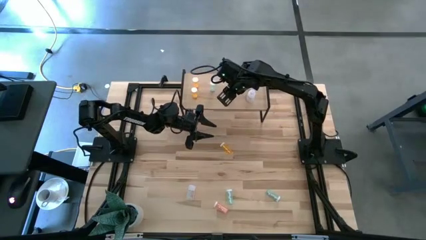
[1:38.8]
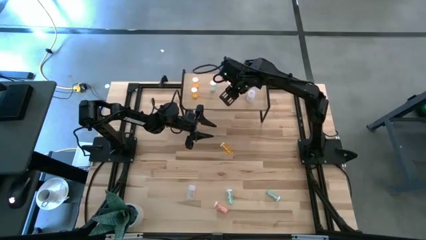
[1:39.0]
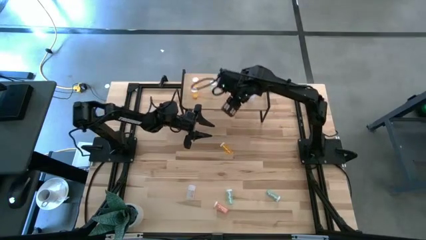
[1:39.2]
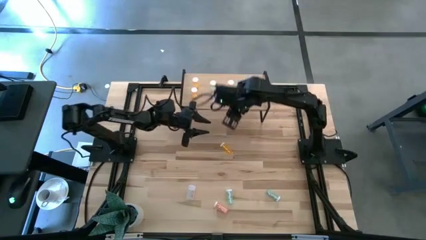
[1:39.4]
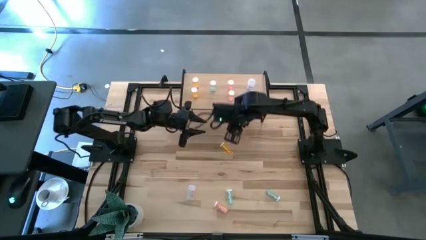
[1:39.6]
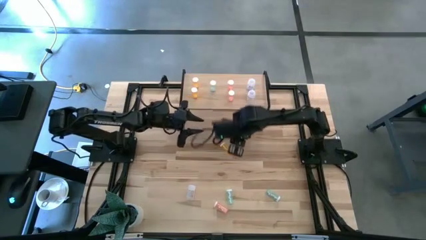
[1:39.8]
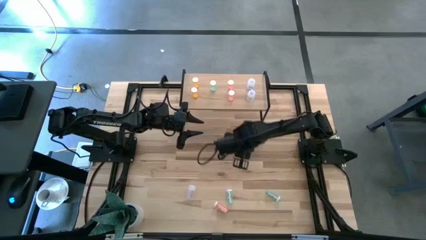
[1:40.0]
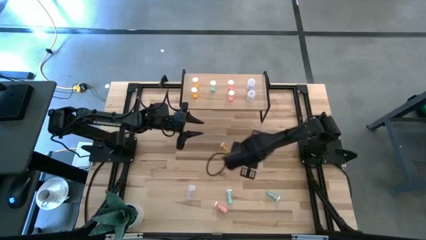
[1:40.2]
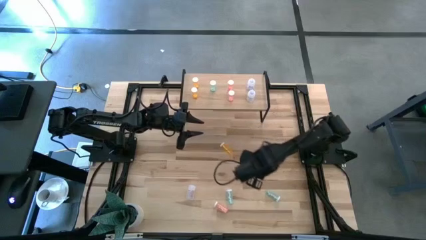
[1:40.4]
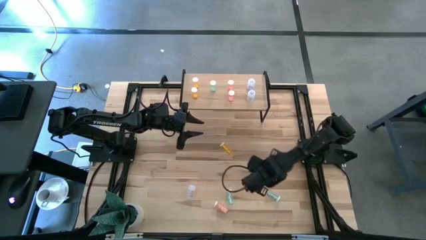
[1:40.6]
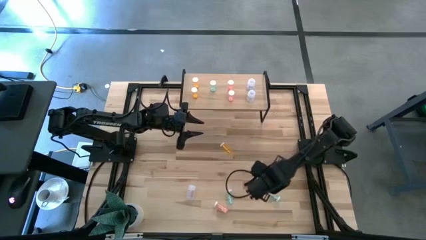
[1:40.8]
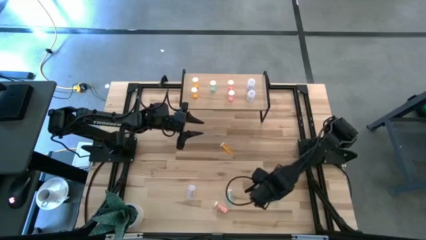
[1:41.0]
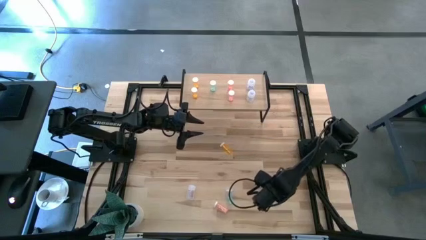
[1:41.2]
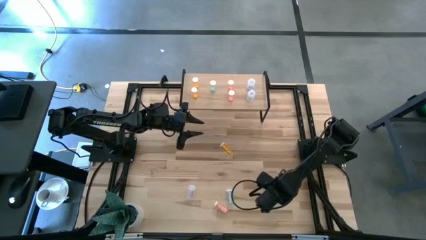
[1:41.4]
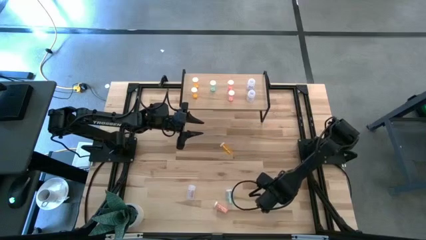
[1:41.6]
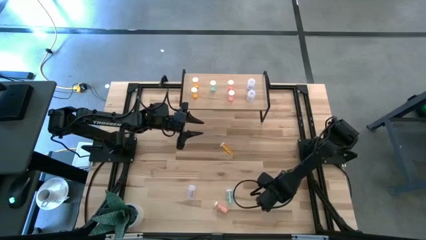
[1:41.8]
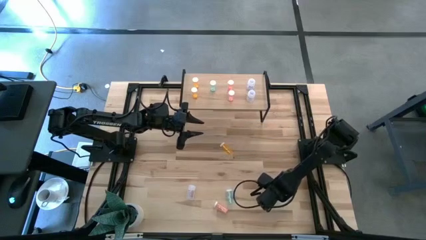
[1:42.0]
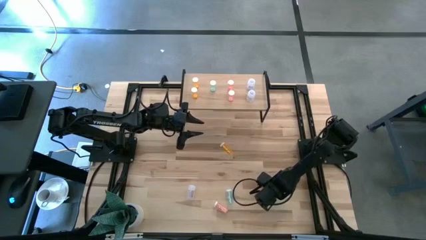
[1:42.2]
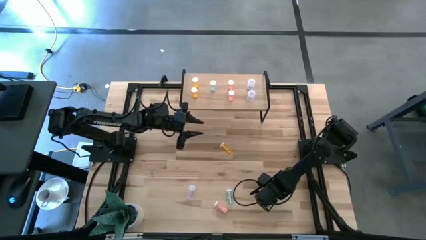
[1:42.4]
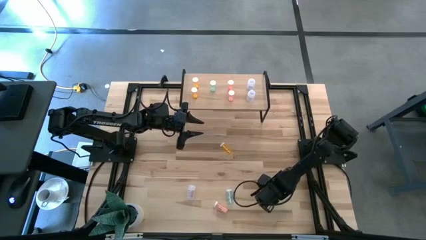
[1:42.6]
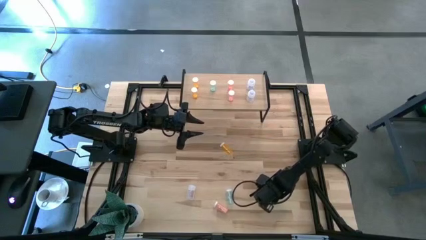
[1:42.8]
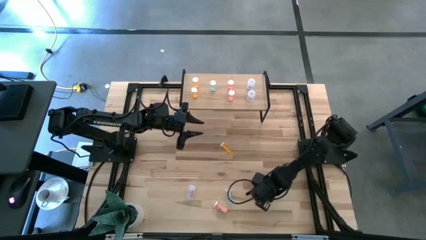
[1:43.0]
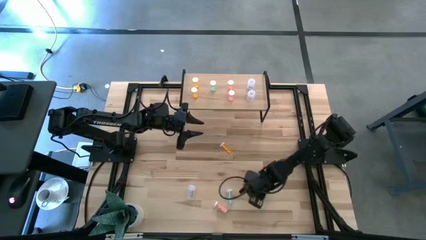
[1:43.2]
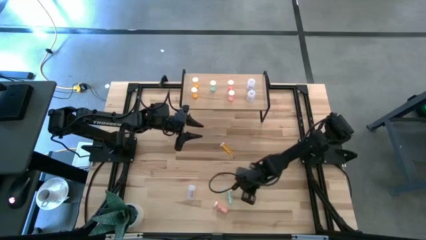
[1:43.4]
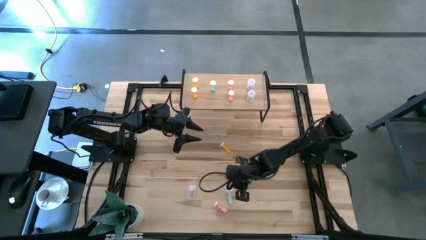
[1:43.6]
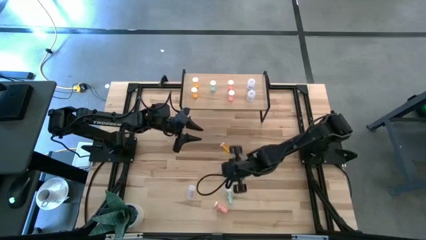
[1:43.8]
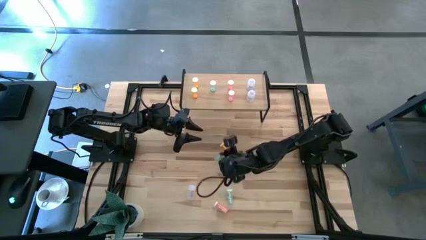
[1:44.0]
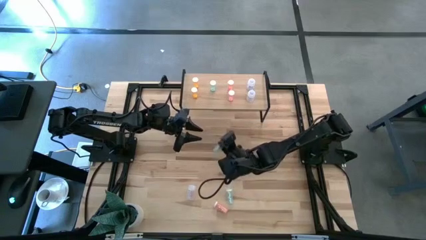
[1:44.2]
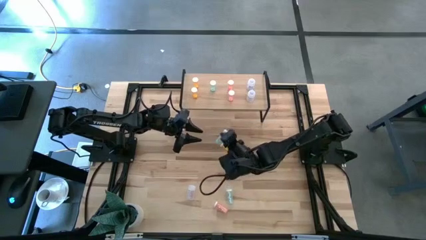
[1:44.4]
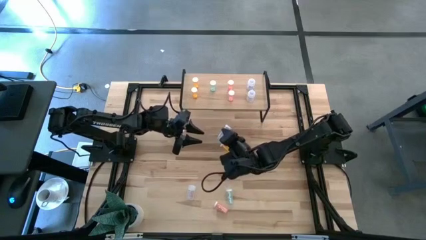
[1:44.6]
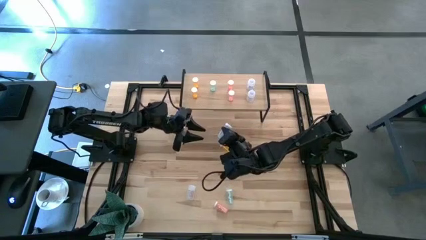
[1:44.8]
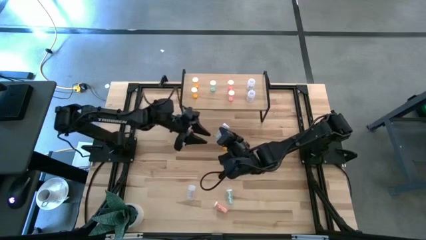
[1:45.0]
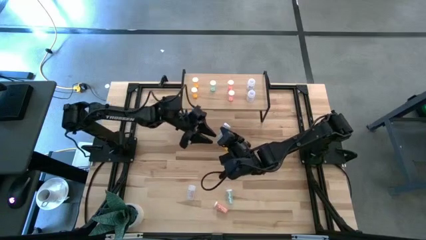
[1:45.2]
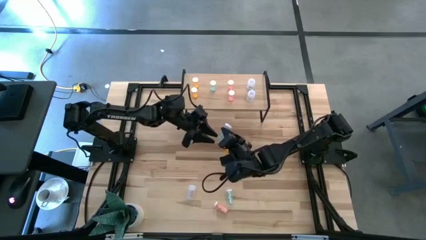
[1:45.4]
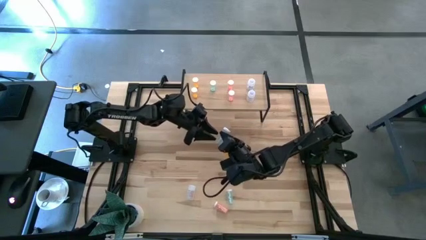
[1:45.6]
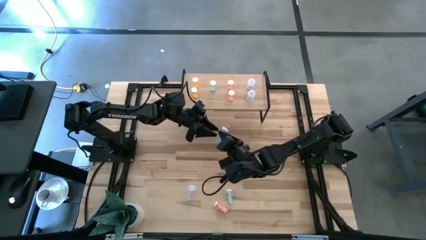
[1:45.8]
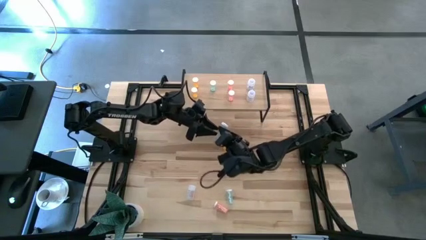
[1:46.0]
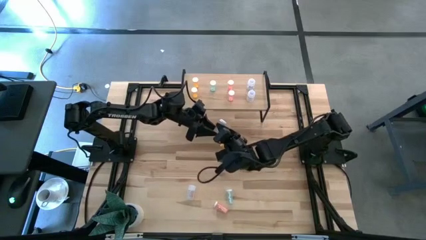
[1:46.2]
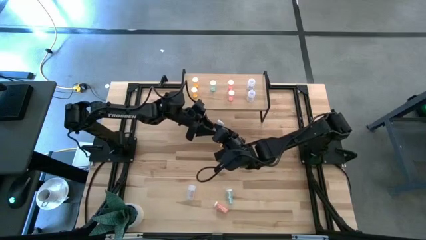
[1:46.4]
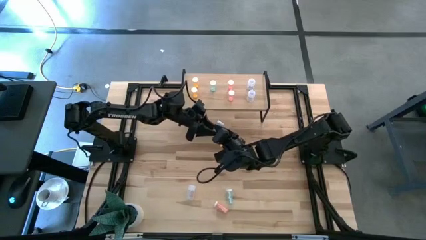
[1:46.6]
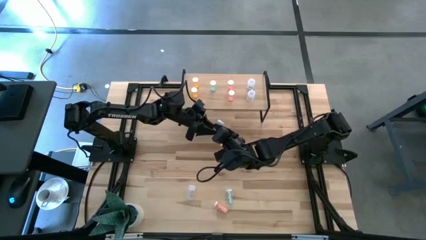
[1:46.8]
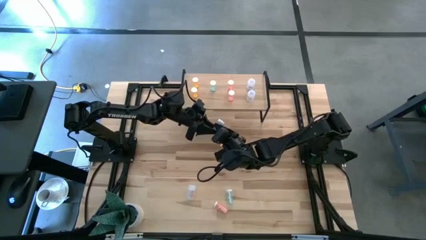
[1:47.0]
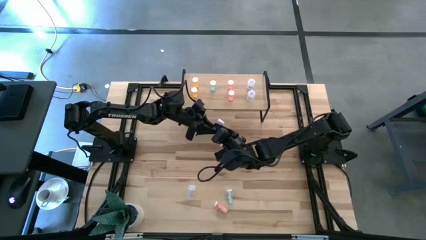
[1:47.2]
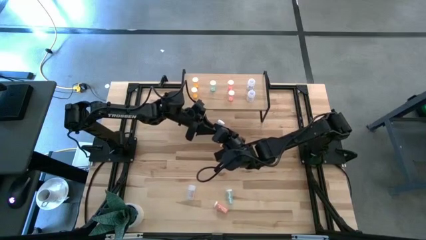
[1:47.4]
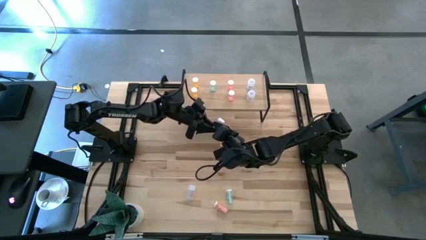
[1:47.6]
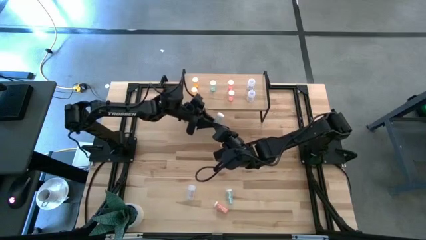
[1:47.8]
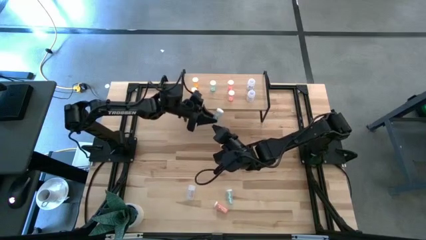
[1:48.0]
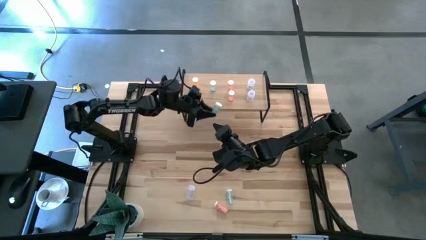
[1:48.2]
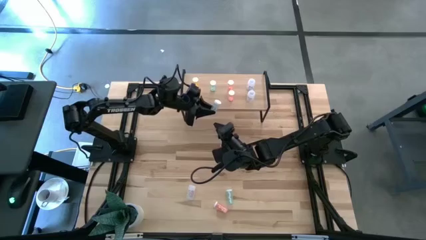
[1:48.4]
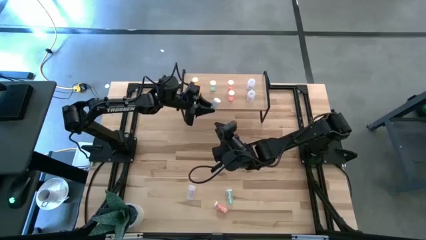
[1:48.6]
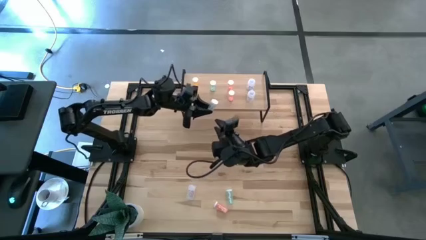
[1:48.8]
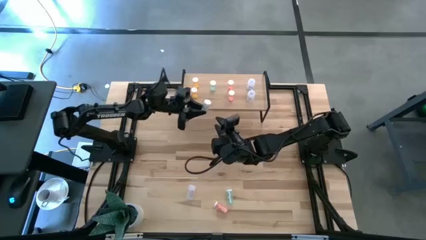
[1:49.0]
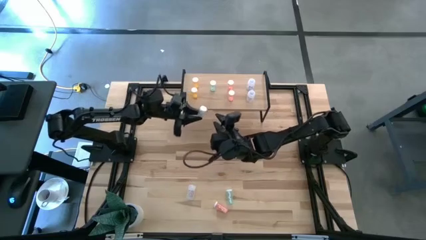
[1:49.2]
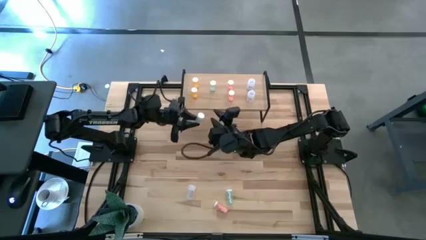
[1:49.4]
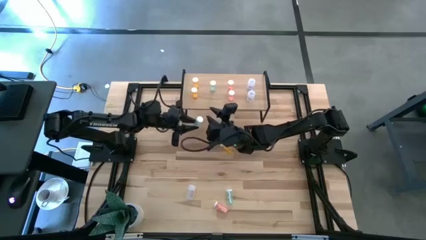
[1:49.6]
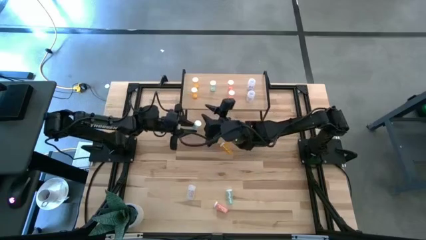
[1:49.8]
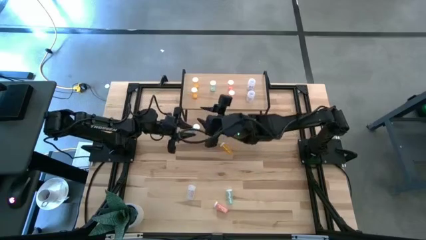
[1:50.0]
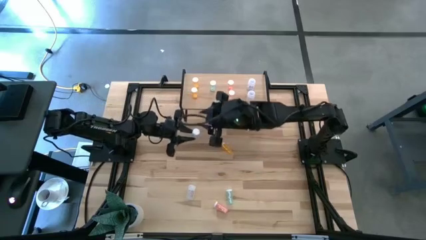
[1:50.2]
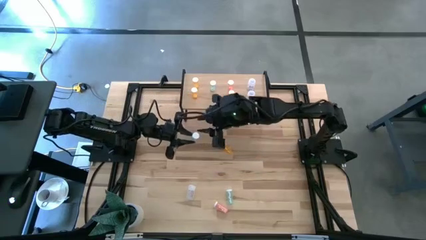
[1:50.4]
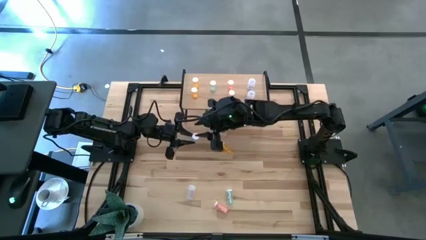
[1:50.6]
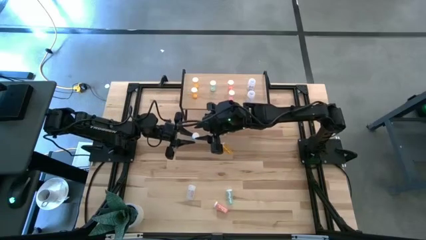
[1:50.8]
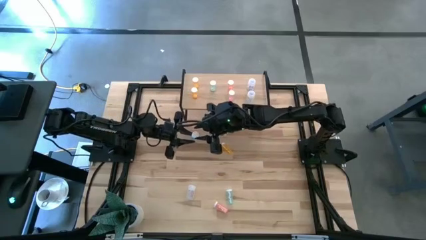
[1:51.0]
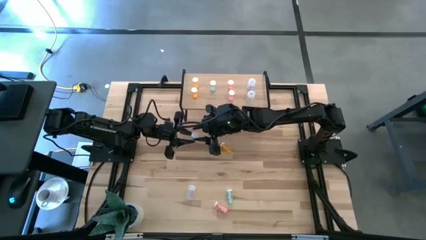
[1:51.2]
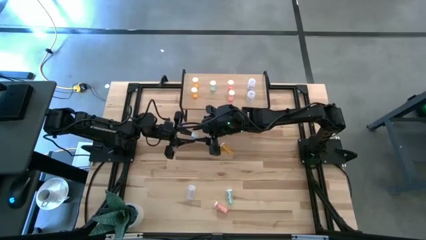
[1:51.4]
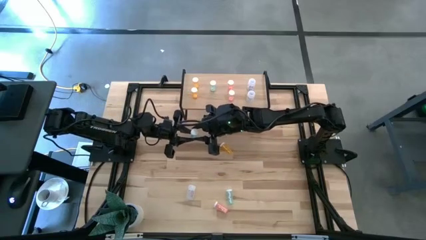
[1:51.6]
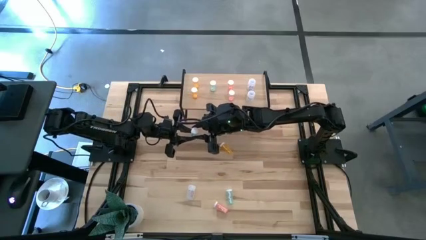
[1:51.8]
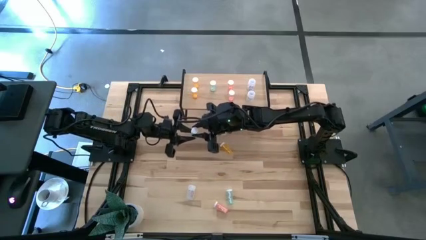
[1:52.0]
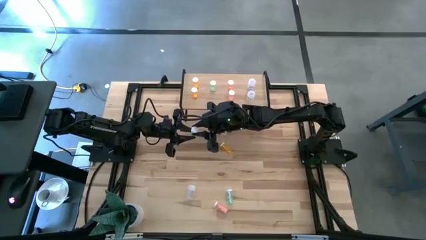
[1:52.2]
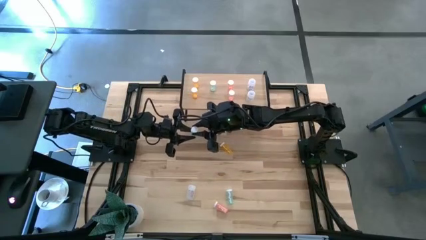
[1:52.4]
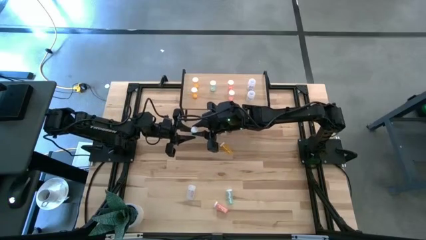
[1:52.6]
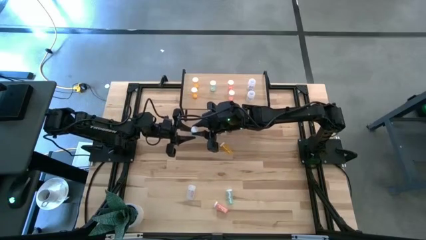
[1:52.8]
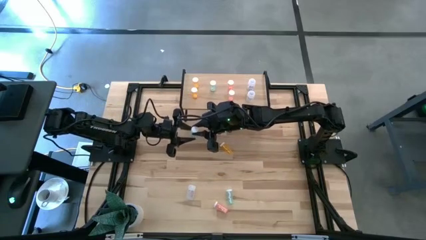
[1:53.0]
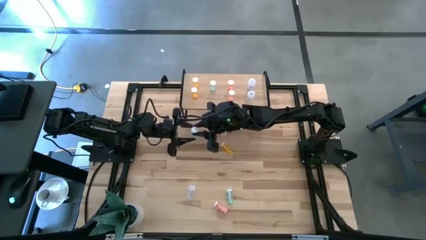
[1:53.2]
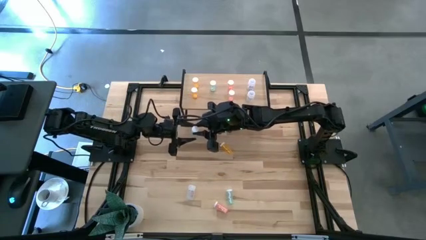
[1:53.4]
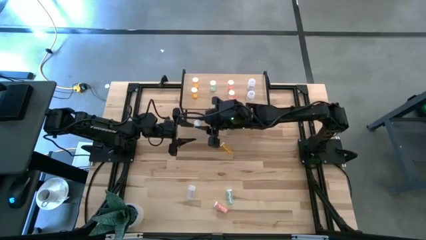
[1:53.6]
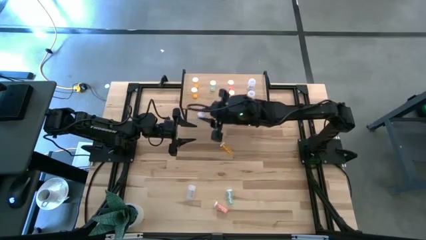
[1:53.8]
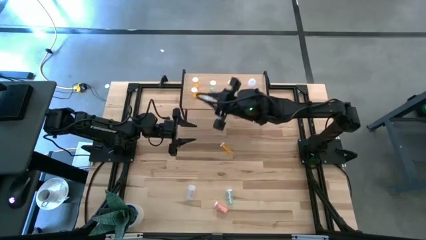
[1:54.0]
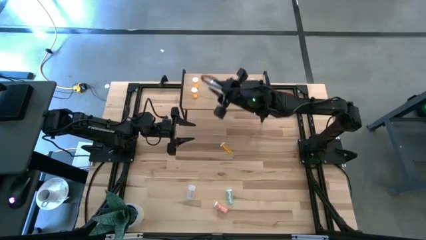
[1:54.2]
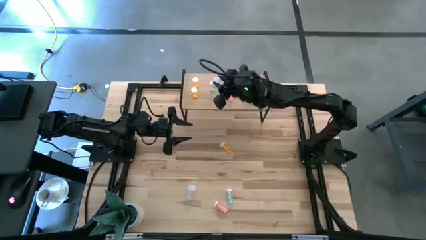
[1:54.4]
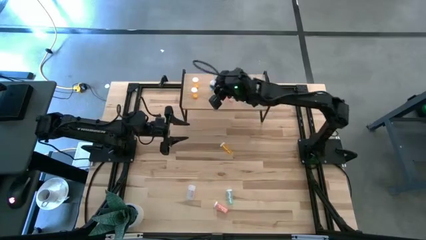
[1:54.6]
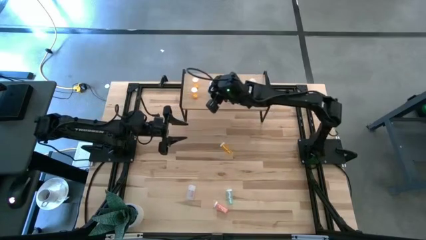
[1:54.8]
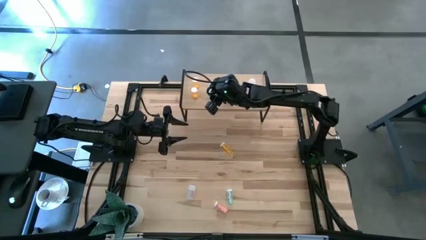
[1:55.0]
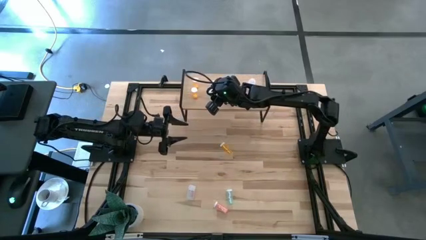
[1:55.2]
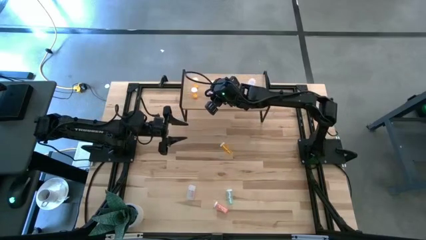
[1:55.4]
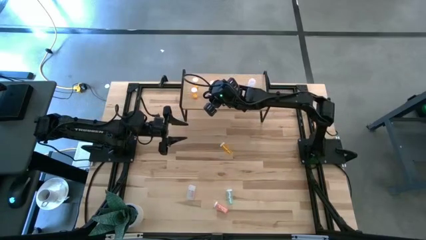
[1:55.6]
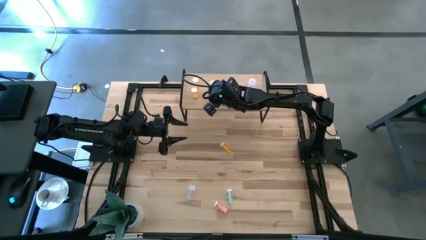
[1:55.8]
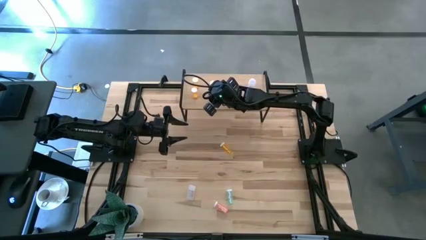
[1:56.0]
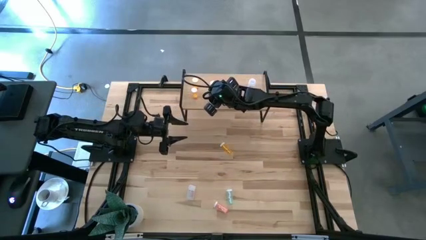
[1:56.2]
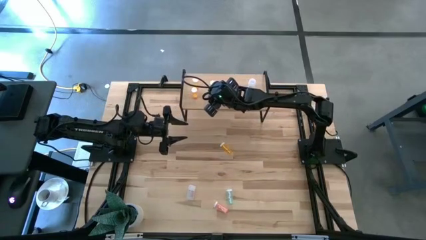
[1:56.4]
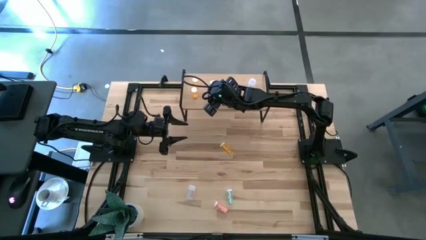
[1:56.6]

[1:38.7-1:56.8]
Task: Pick and place medicine bottles onto shelf by color
Put the blue pill bottle on the shelf aligned with the blue pill bottle
